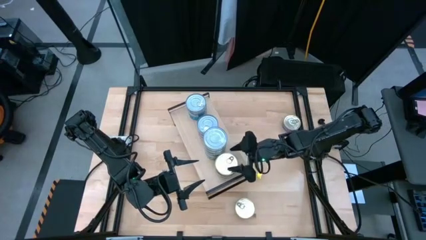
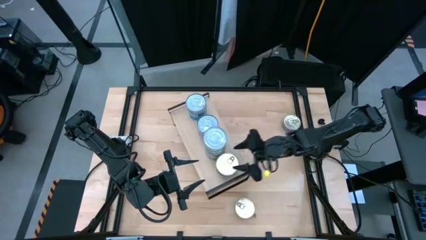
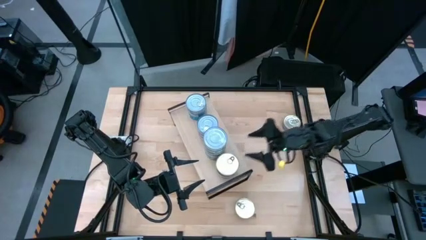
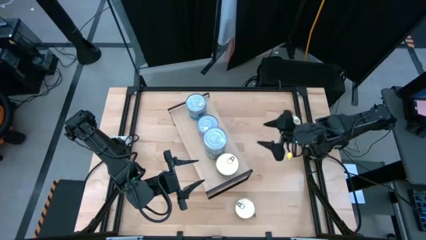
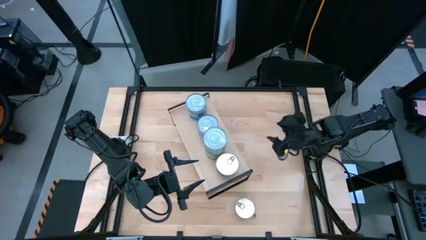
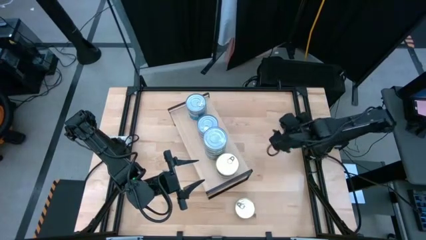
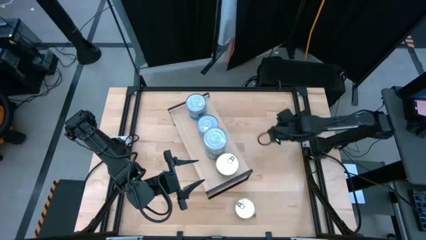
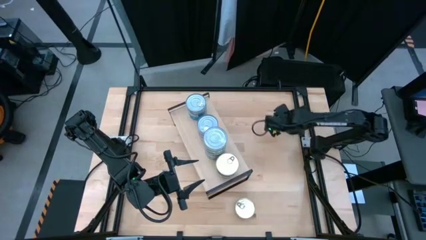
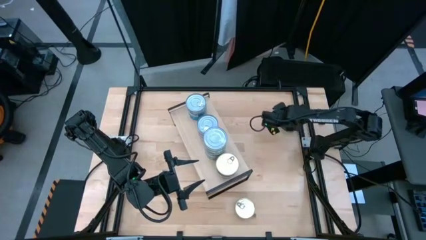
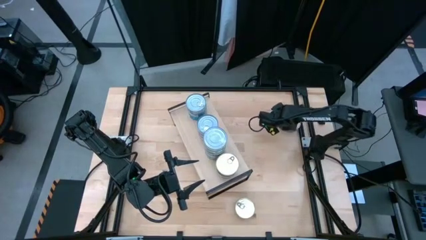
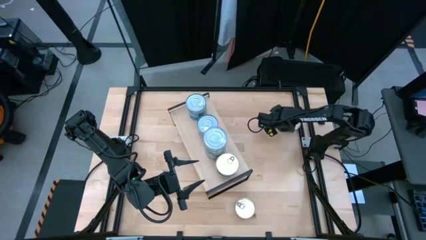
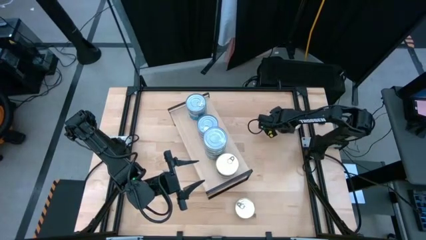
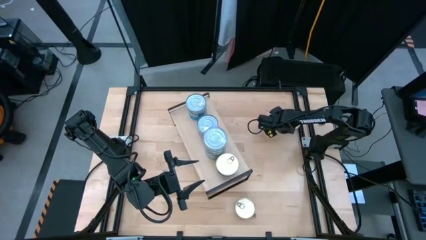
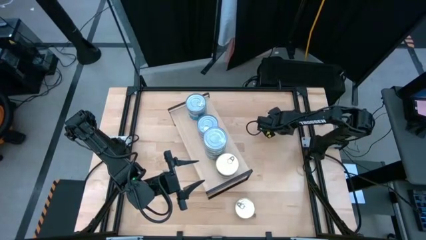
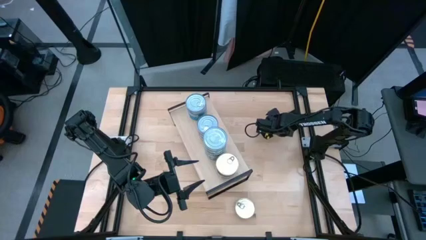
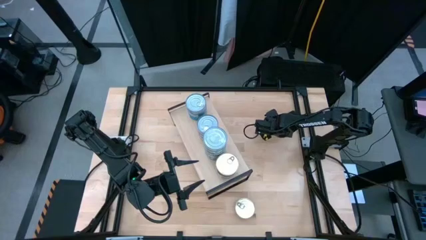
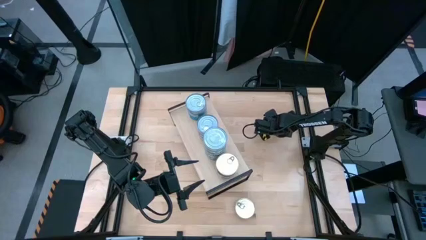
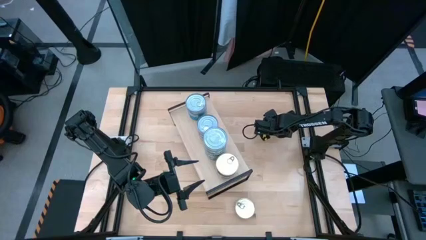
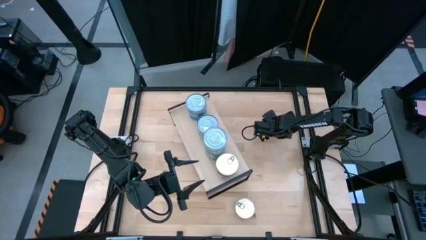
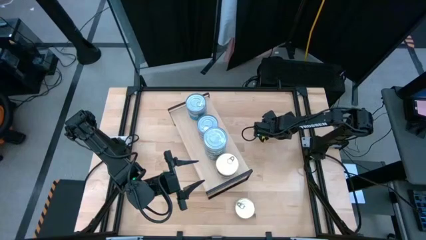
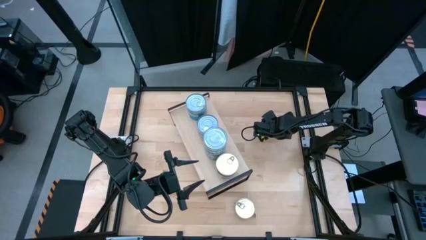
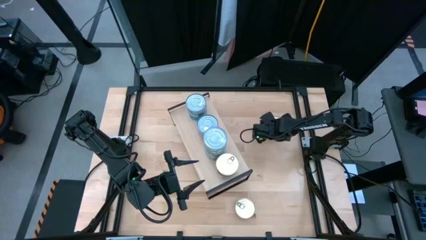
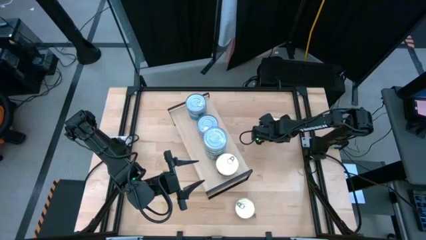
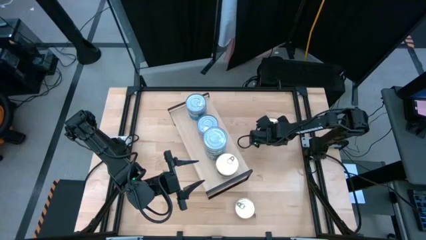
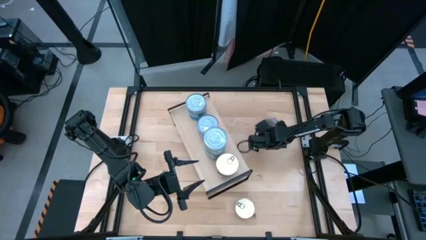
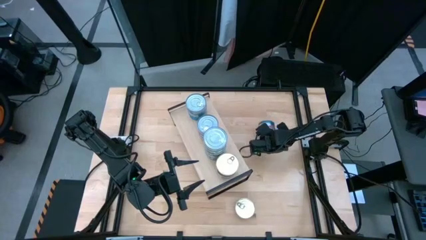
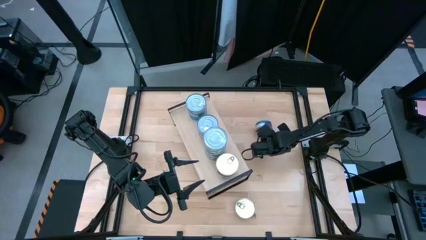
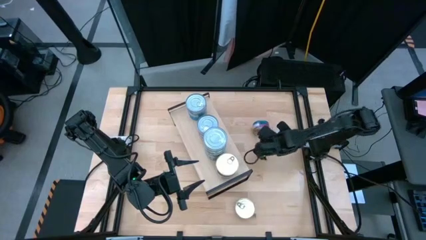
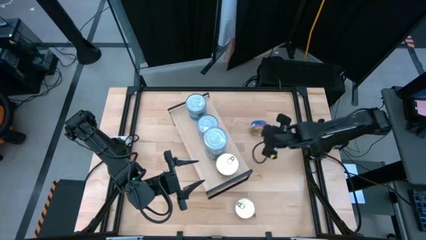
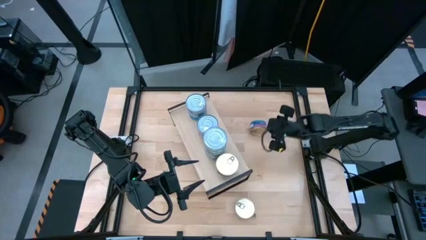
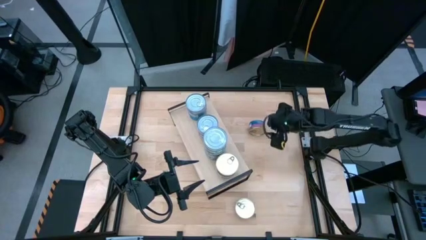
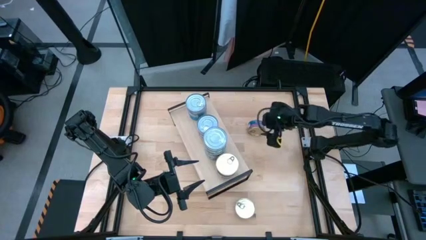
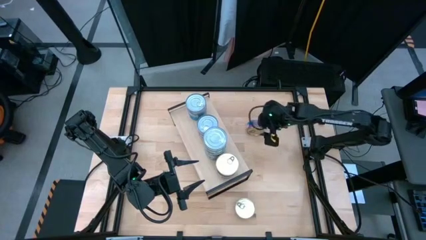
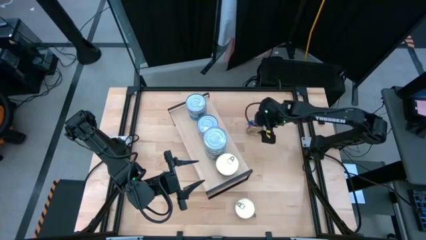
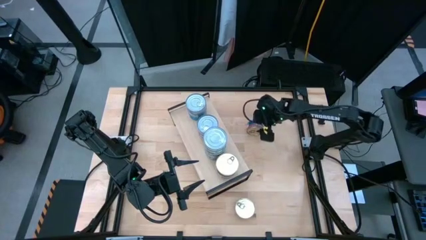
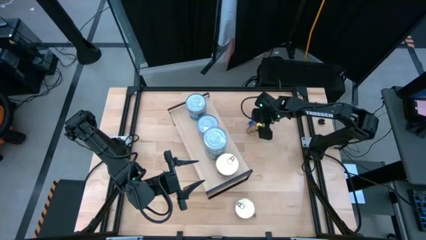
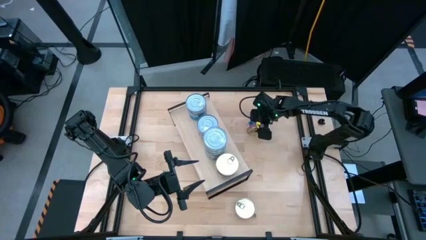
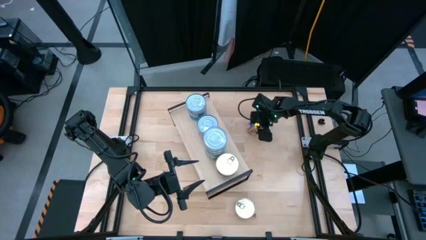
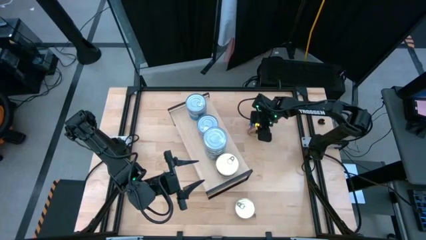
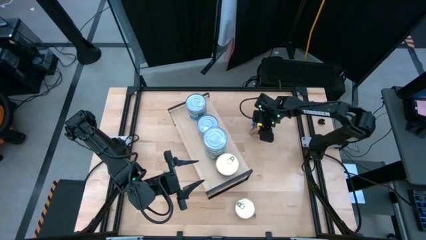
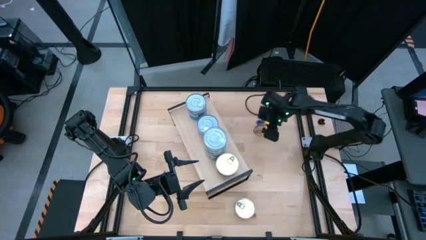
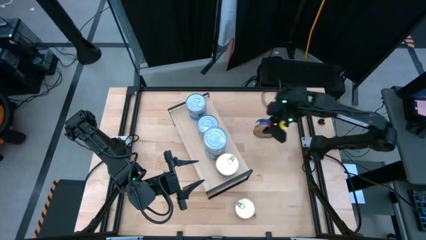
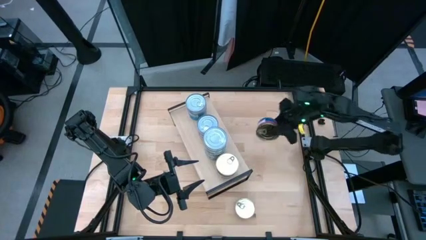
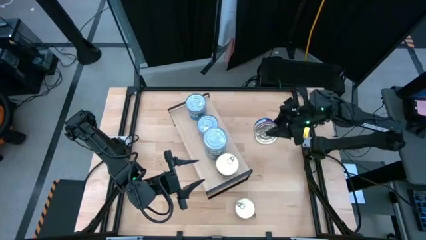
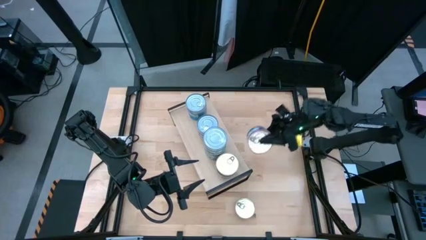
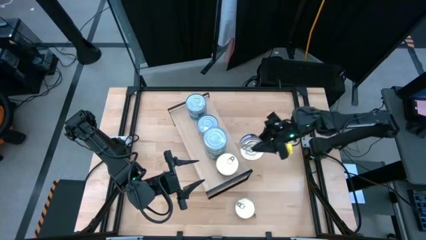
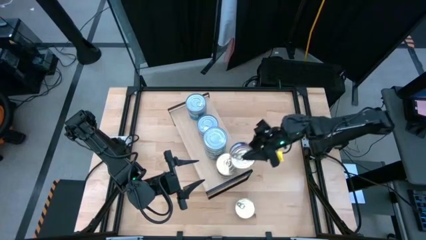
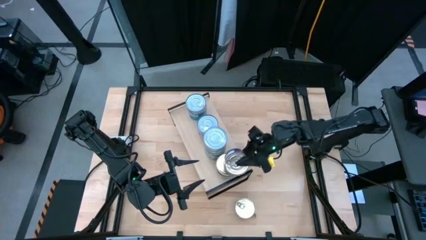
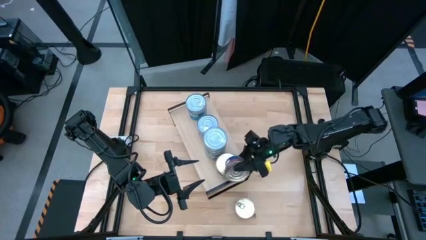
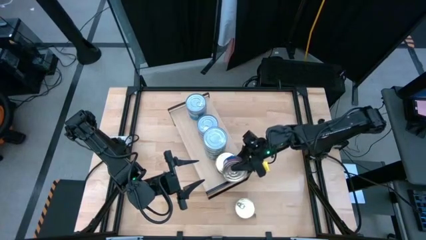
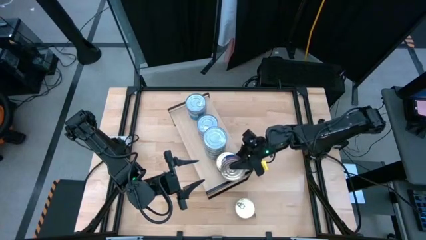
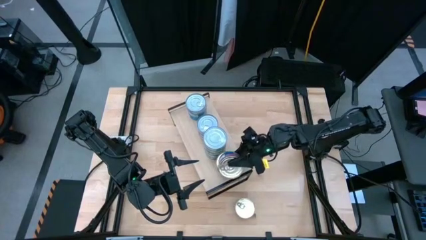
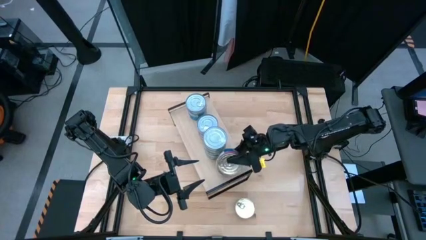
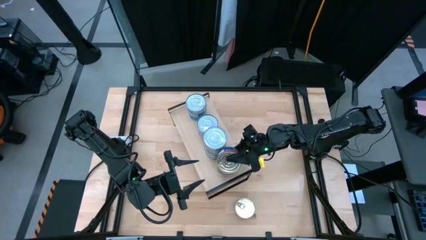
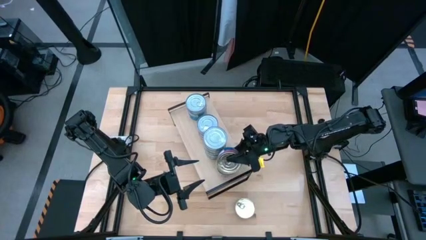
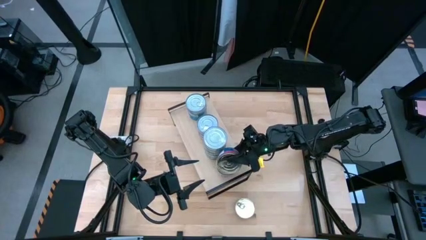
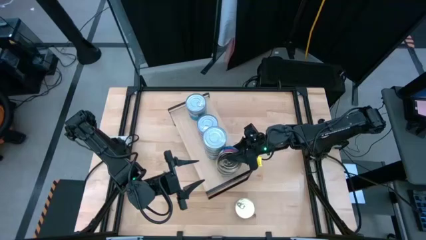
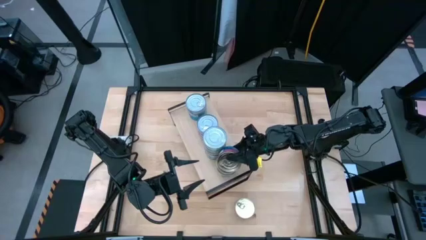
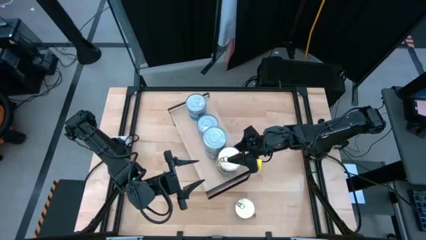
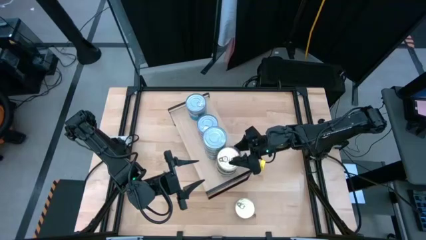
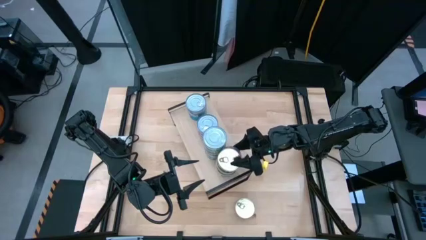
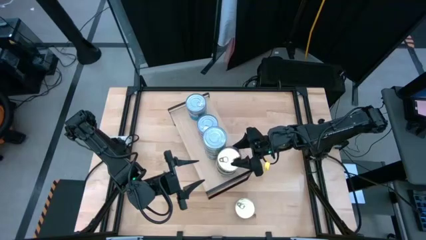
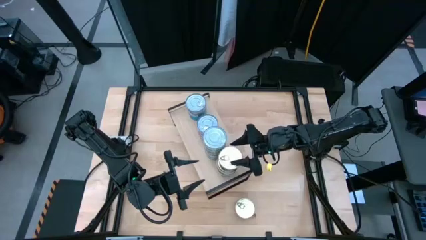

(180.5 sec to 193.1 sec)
Task: Stack canned seafood by type on shelf
Stack the blue-pink tuna can on top of the blue-pink tuna cans on the shelf

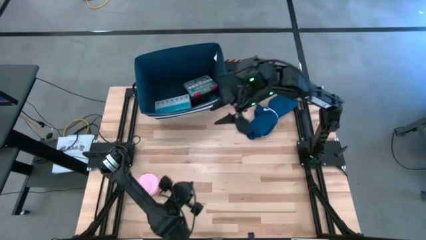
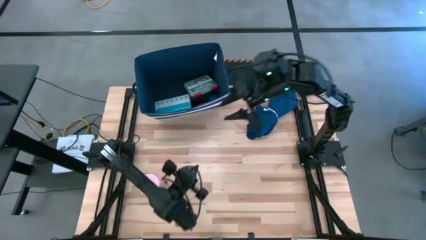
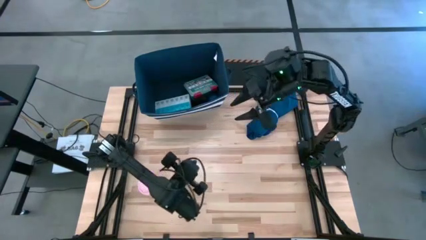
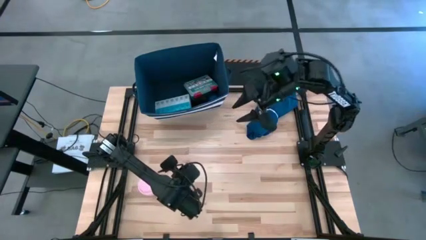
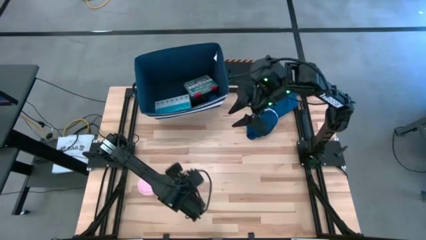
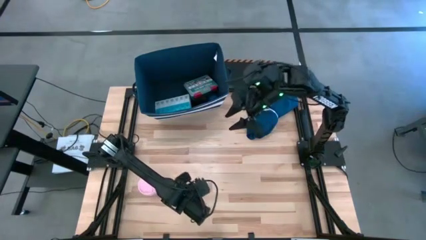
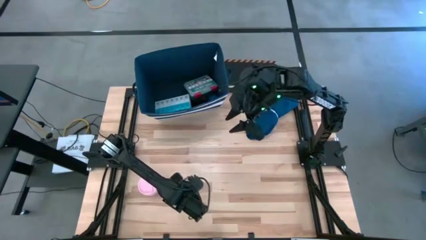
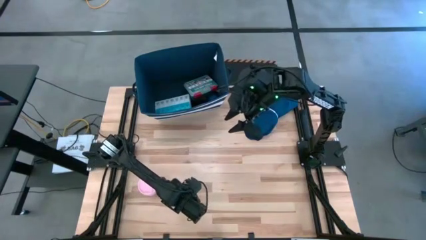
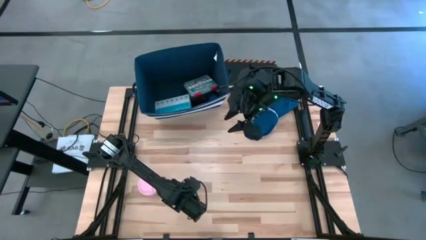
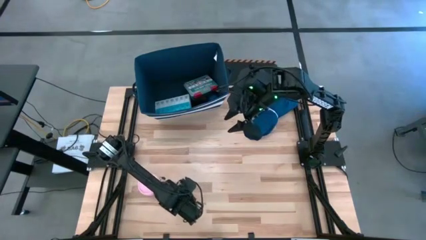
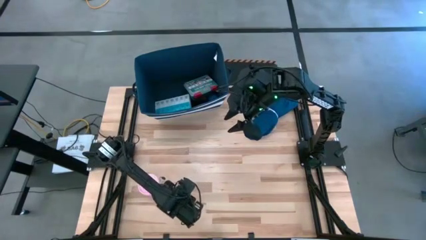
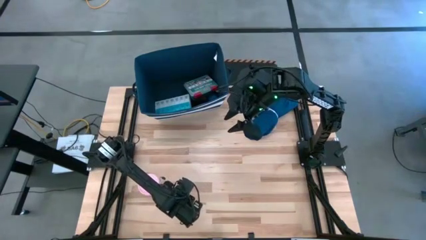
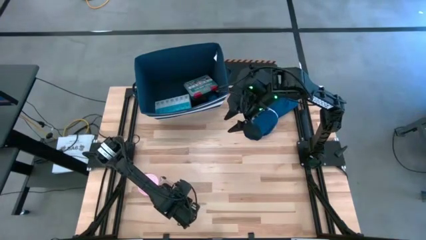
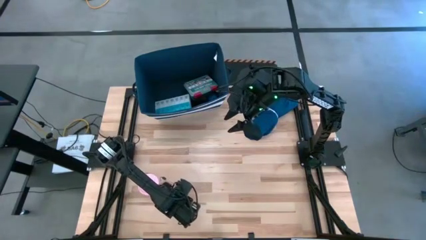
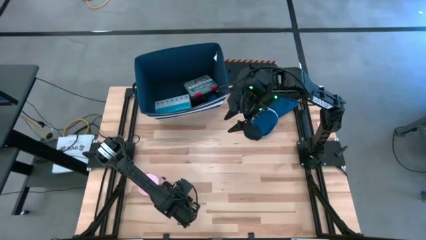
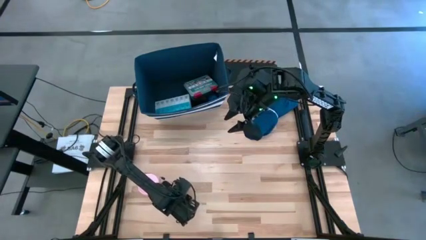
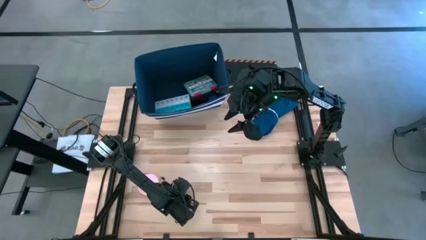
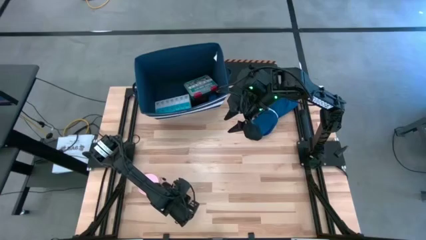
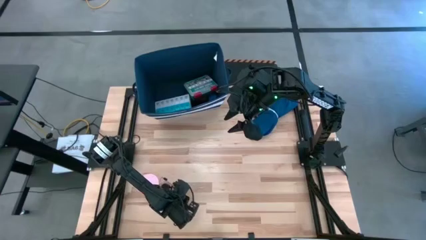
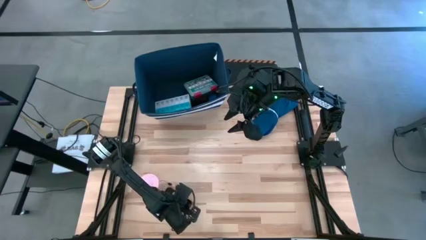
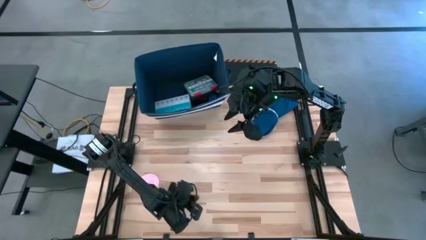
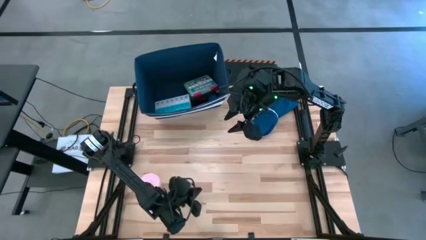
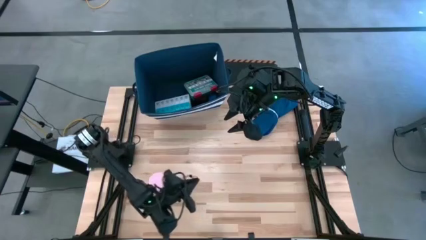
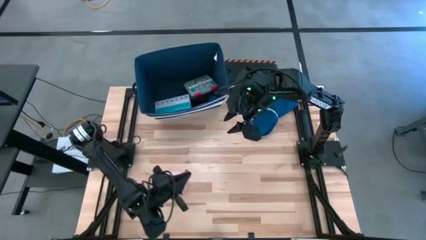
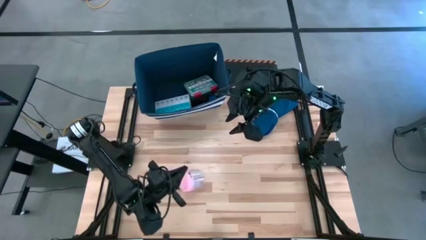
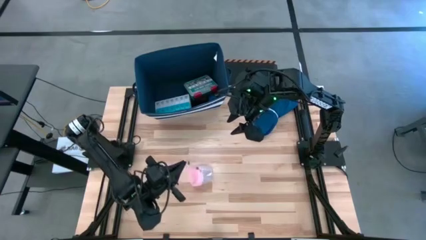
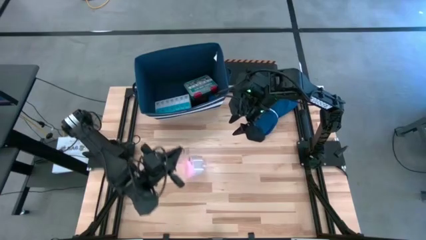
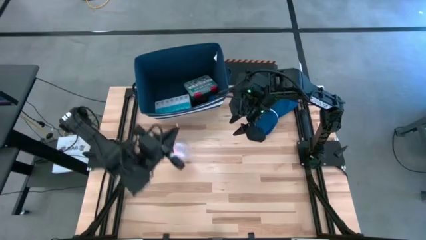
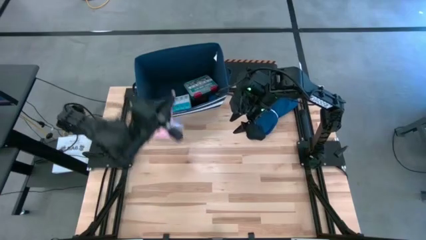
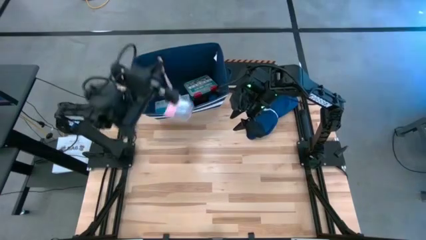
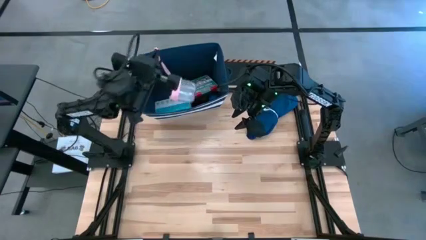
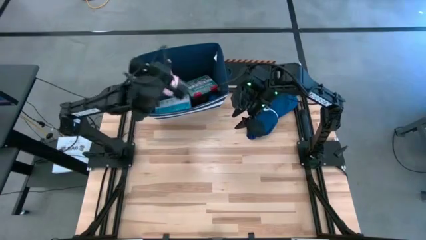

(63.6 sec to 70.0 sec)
Task: Pick & place medical supplies in basket/bin
Put the pink tumbler into the blue bin
